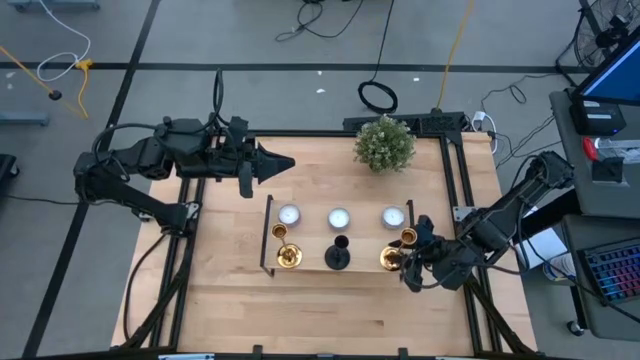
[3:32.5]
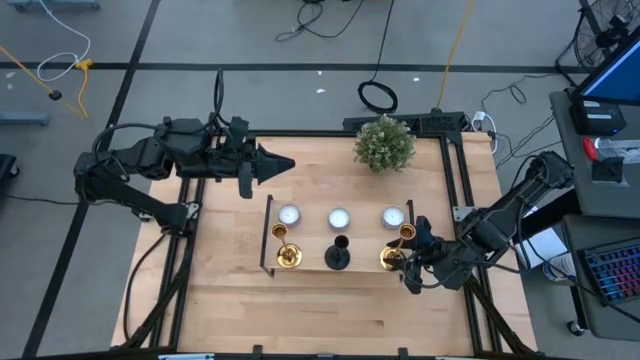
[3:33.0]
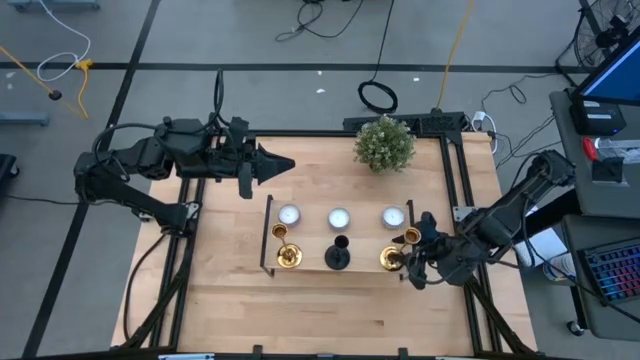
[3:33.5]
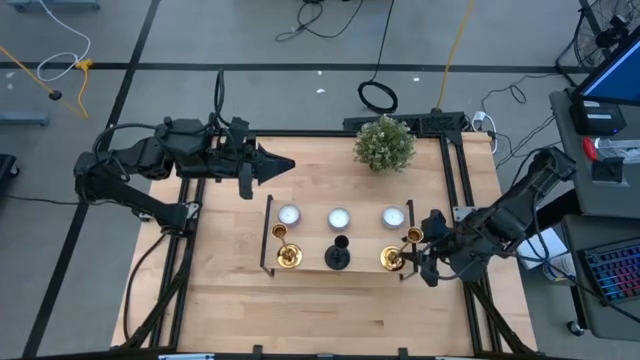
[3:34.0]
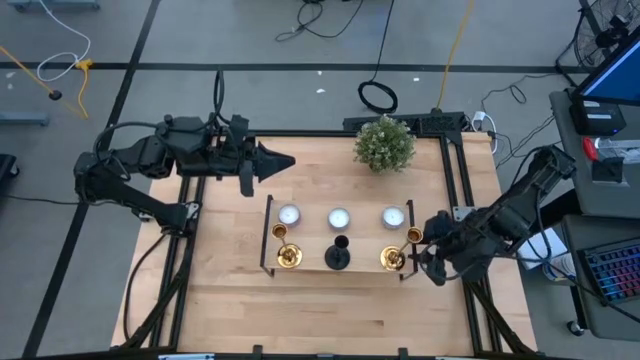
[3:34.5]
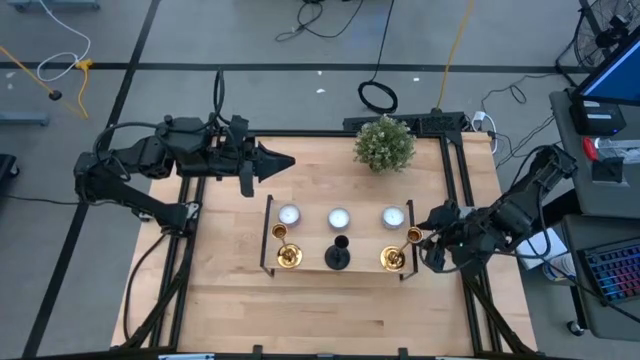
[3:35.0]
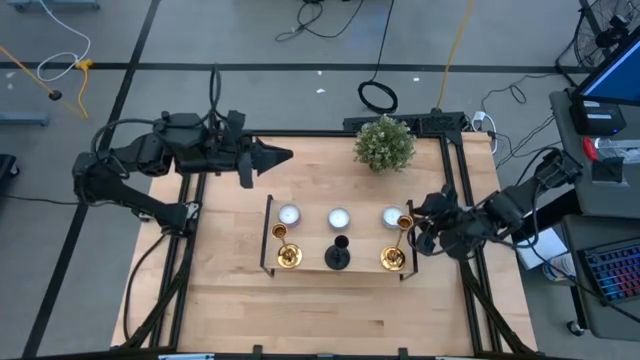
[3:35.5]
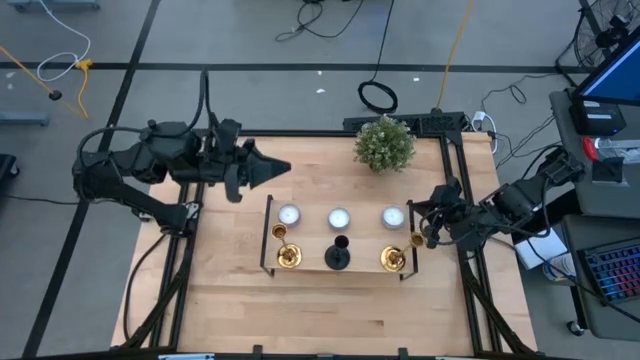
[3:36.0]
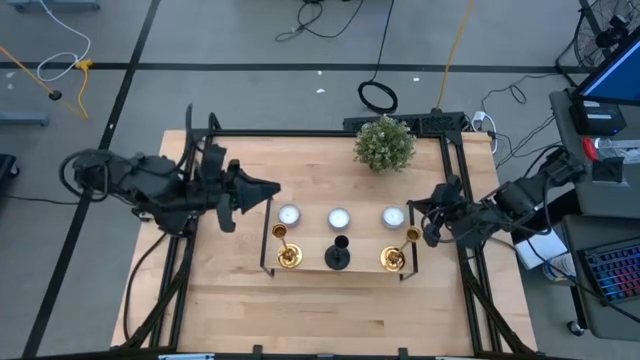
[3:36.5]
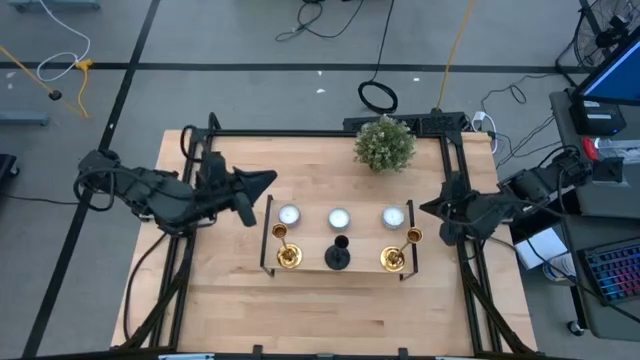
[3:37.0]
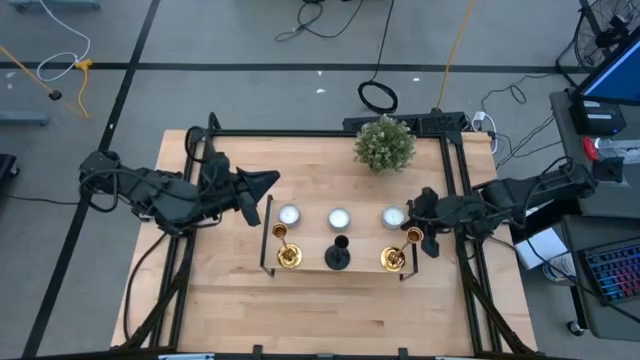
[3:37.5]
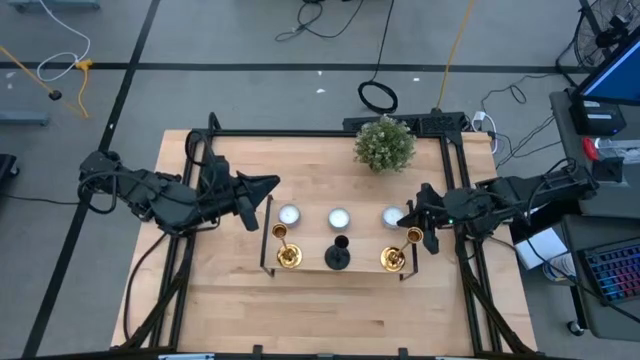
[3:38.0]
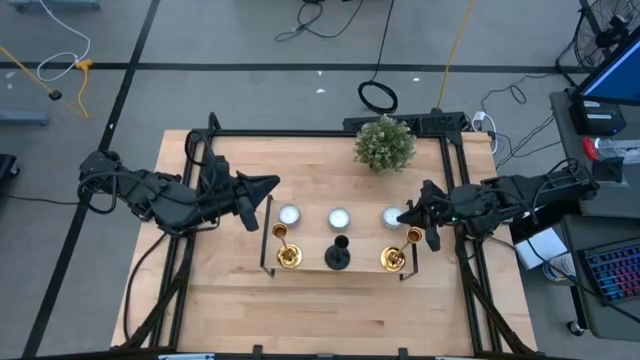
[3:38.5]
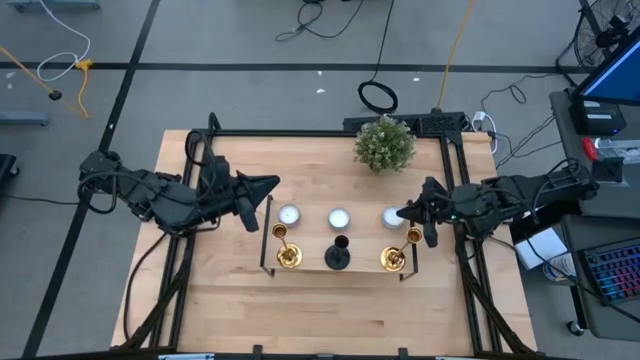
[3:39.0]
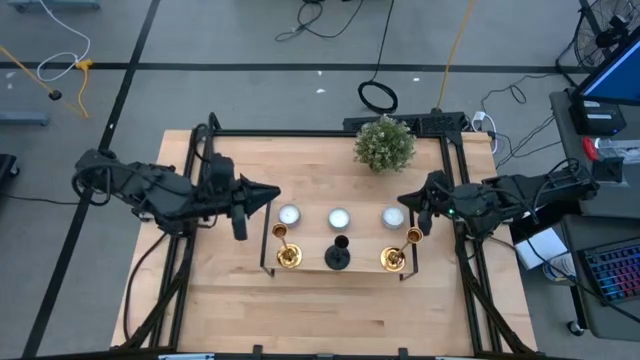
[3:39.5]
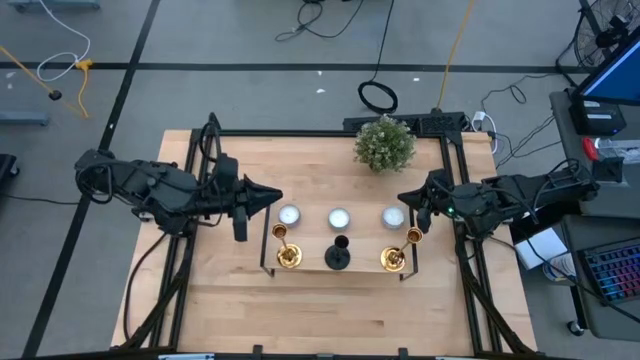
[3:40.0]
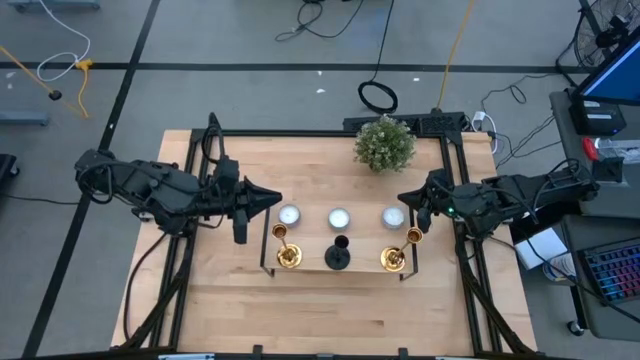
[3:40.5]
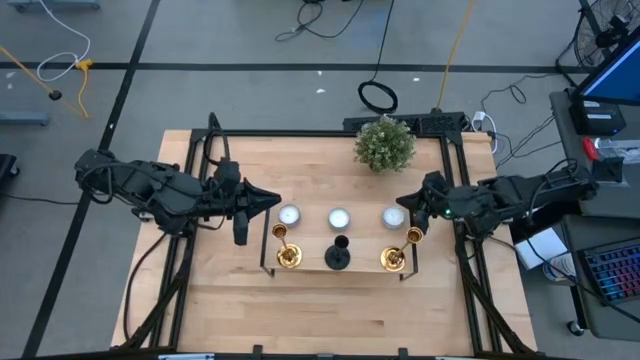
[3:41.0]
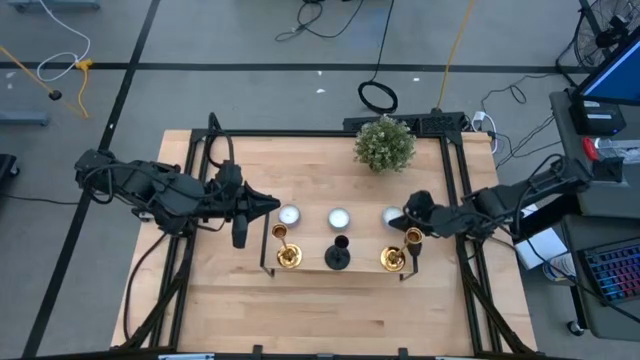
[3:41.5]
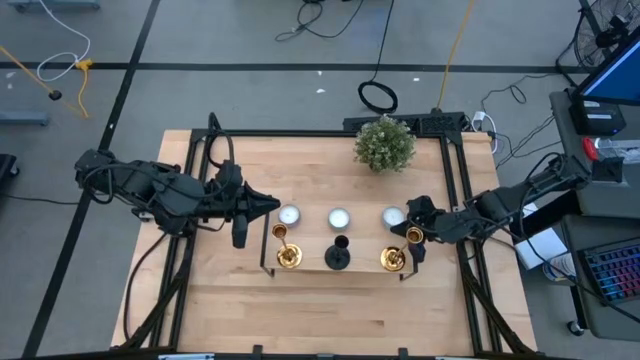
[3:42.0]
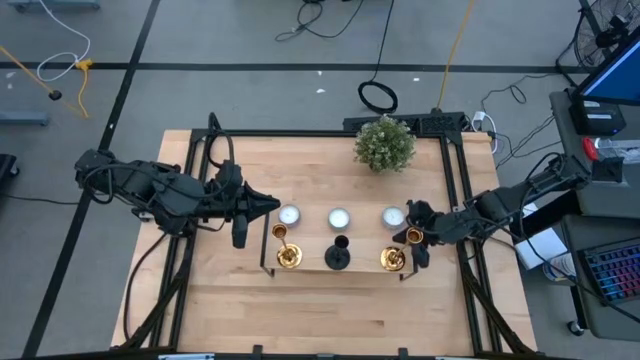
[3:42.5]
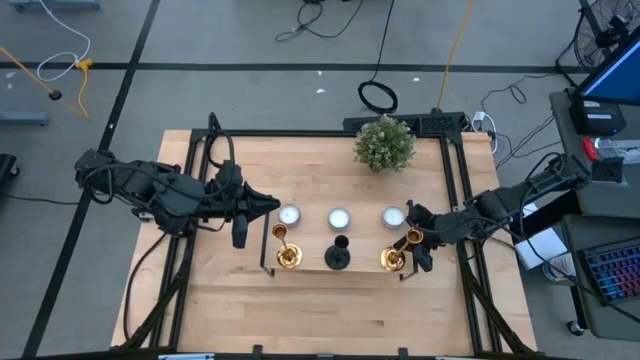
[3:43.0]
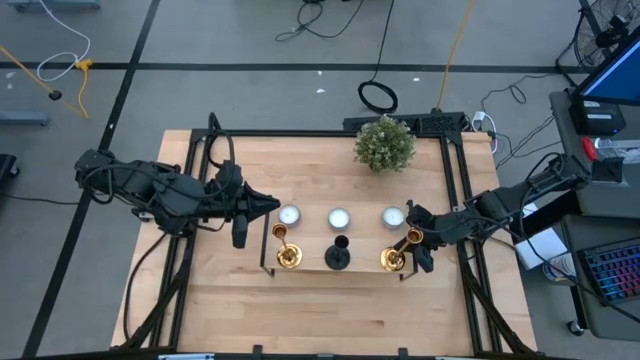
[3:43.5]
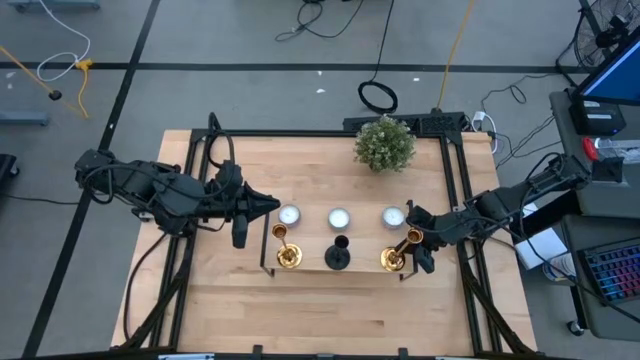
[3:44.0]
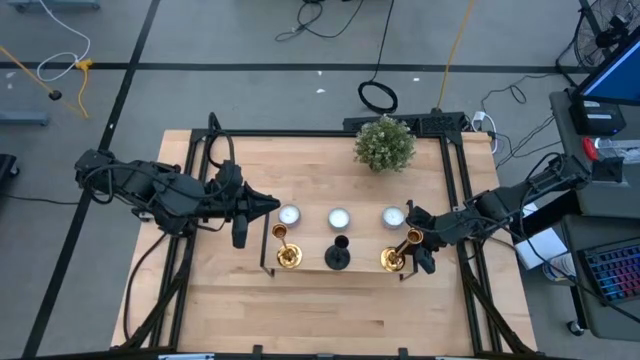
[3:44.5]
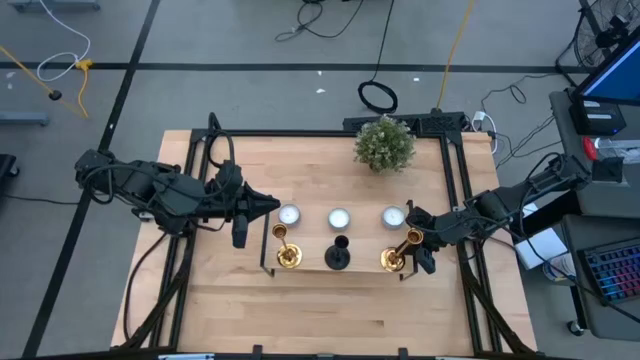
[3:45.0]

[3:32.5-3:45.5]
Task: Pick & Place candle stick holders
Put the golden candle holder onto shelf

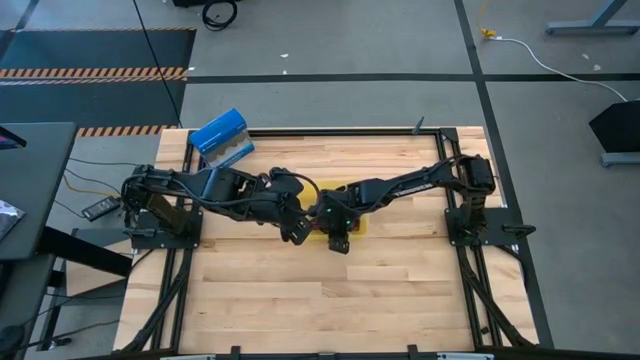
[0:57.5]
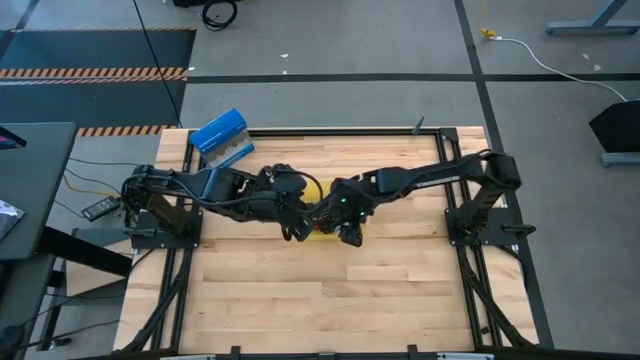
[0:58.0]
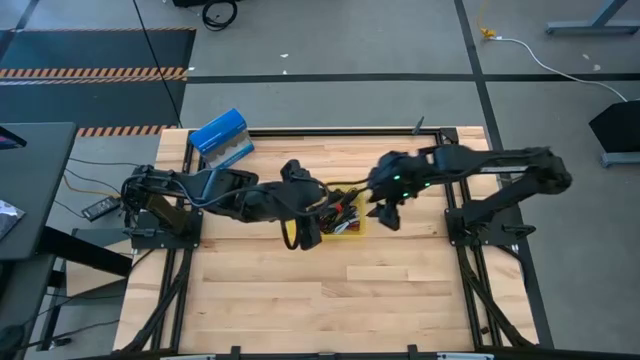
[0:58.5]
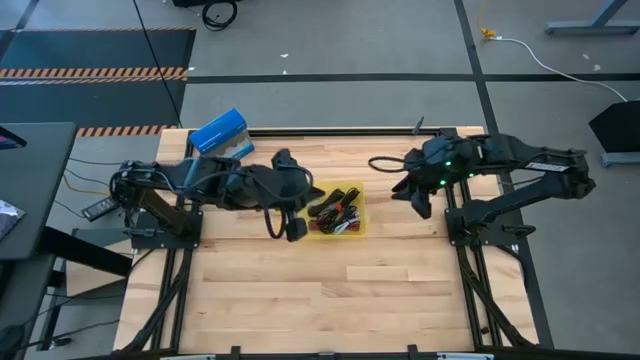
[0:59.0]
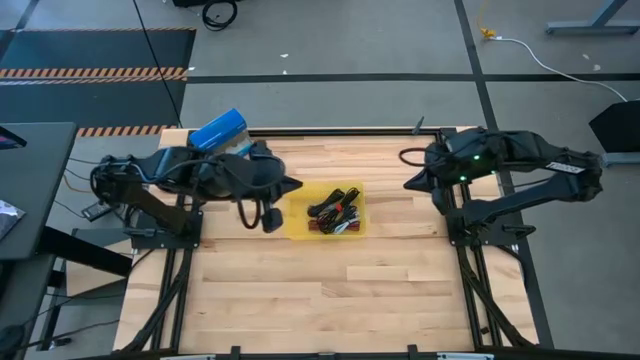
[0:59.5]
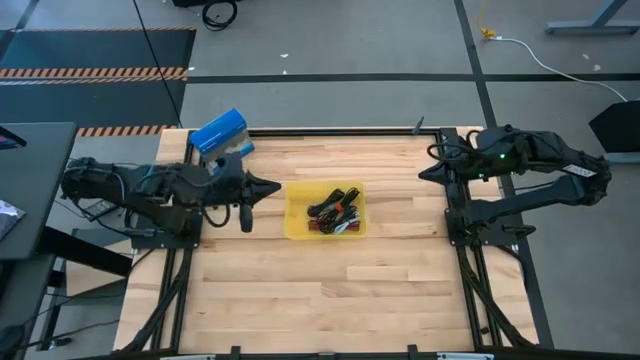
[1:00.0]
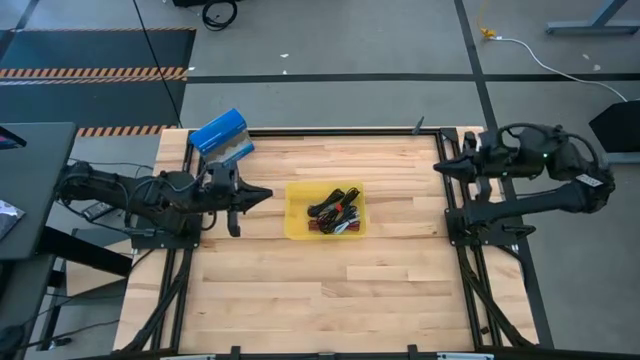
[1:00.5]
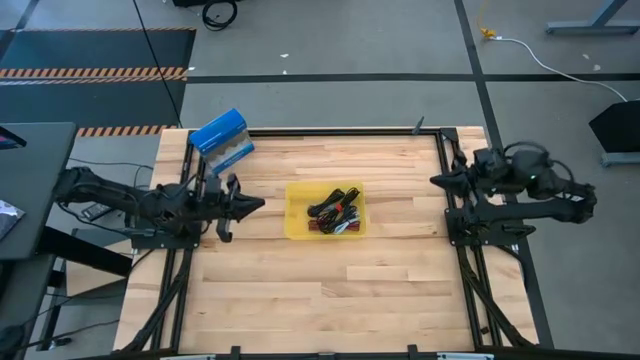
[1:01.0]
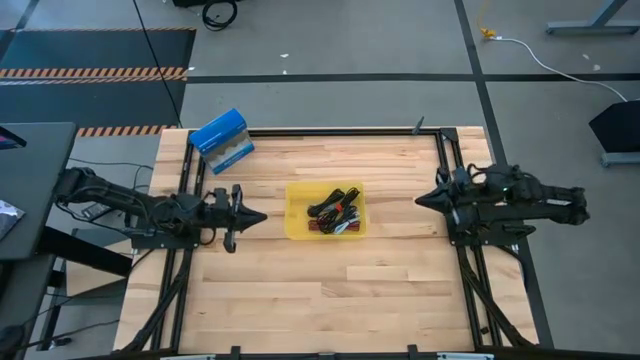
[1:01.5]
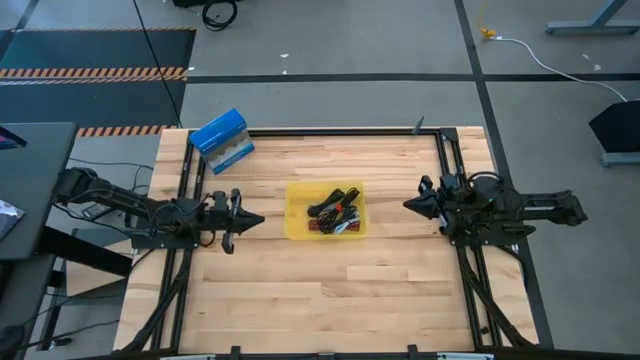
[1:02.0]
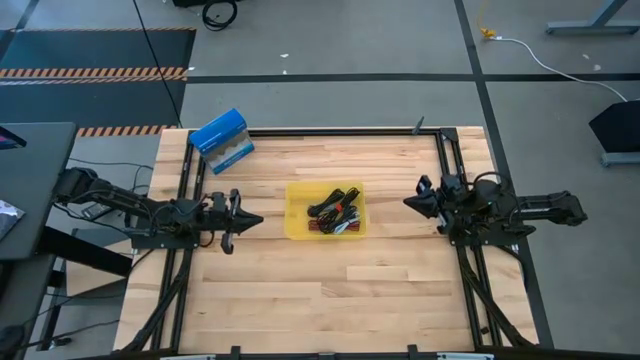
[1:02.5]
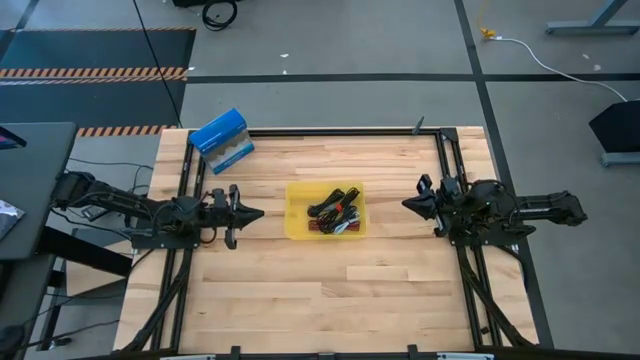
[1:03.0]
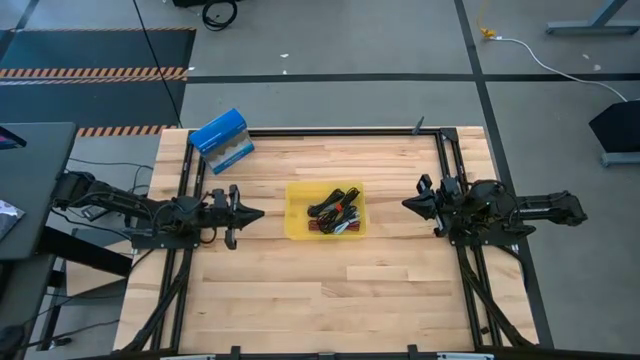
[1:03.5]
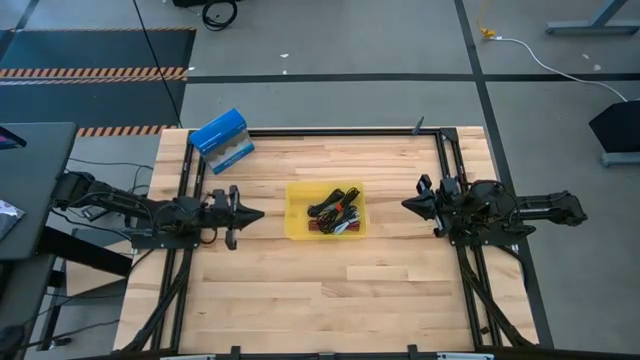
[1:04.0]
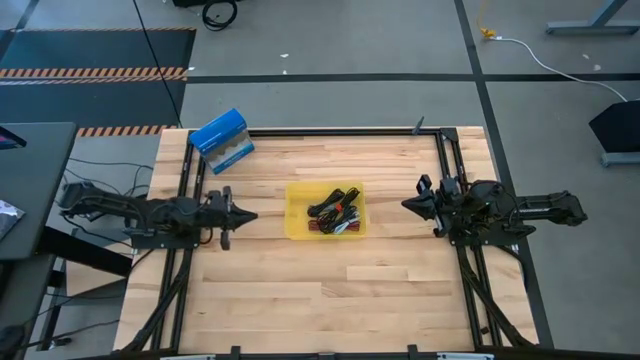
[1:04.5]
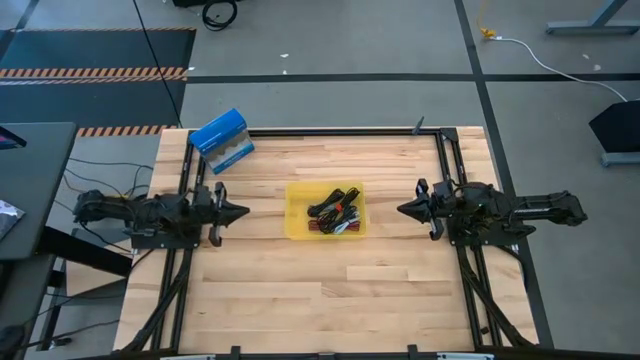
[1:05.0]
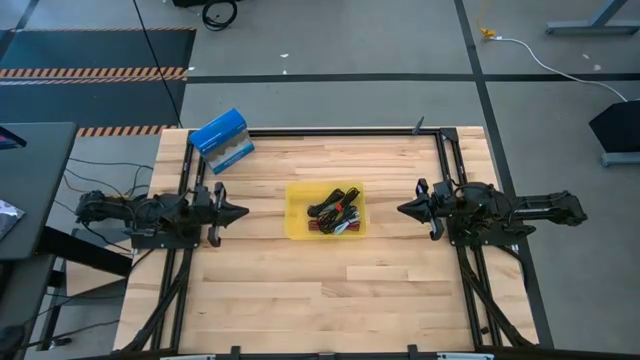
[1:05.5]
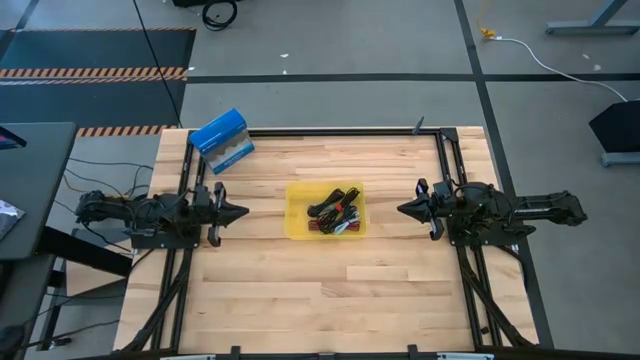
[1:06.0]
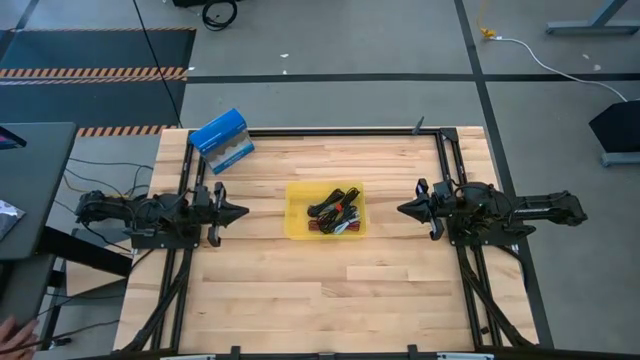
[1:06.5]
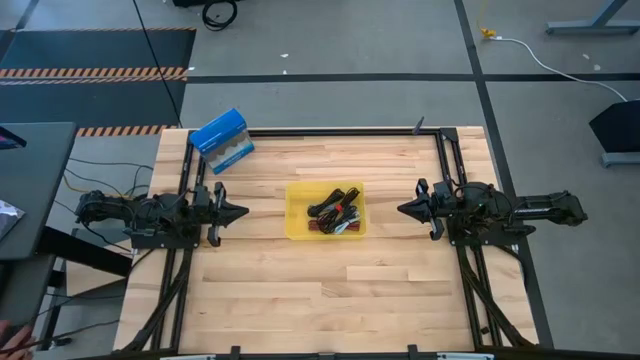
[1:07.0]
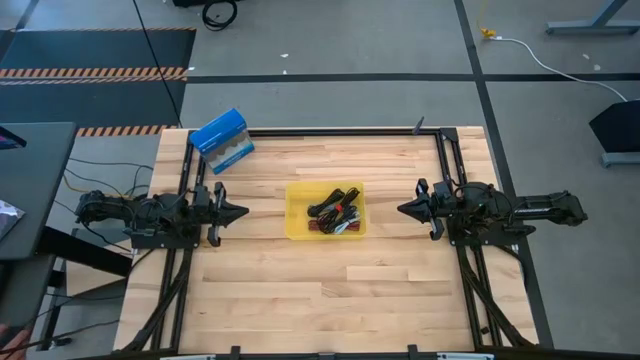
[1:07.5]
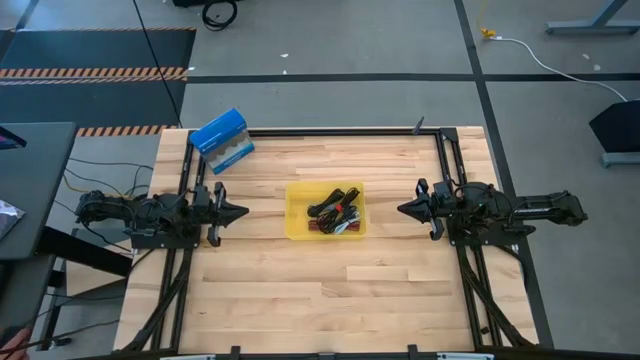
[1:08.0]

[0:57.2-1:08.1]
Task: Pick and place USB-C Cables
Return to Home Position
